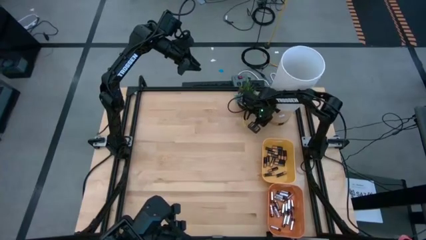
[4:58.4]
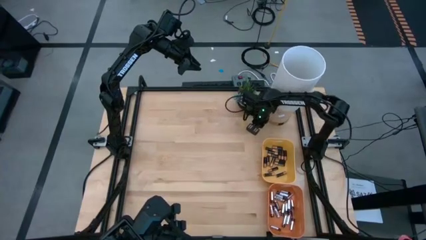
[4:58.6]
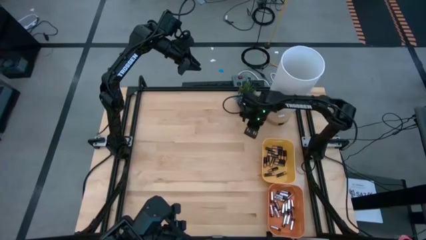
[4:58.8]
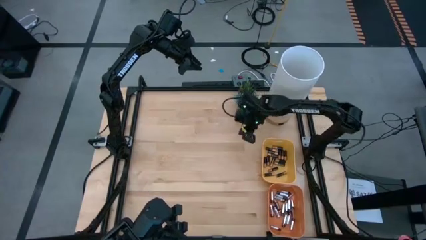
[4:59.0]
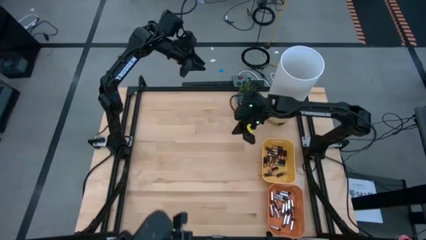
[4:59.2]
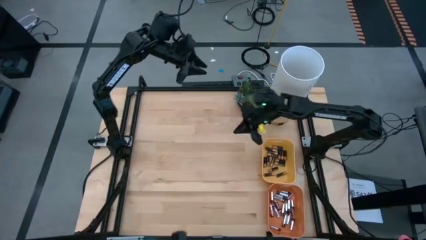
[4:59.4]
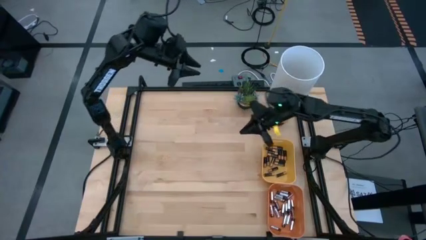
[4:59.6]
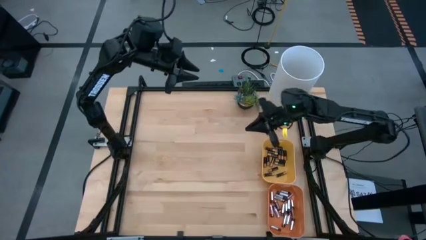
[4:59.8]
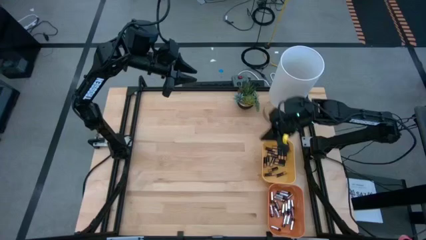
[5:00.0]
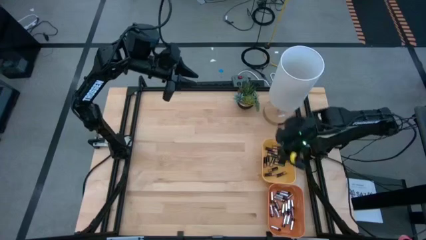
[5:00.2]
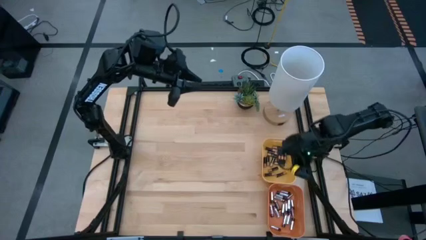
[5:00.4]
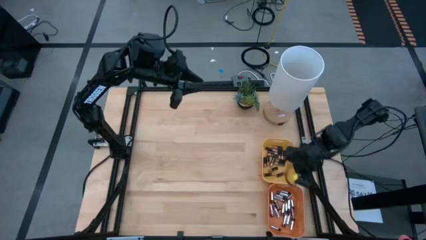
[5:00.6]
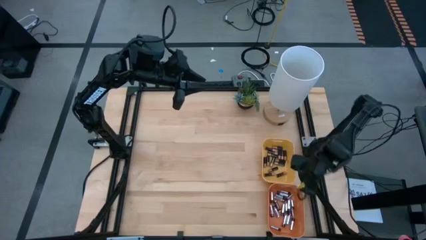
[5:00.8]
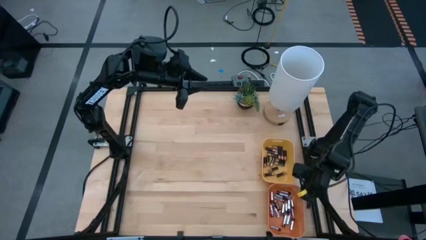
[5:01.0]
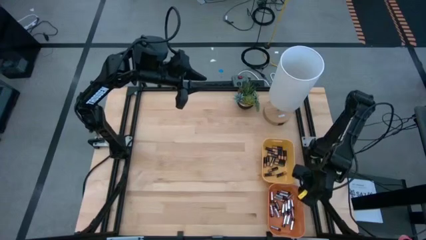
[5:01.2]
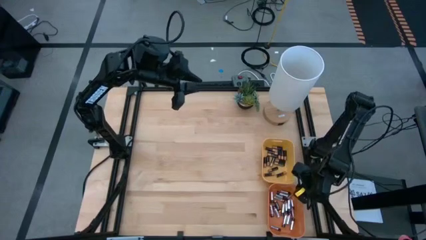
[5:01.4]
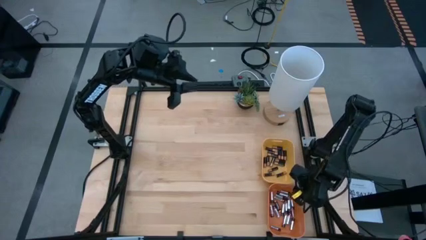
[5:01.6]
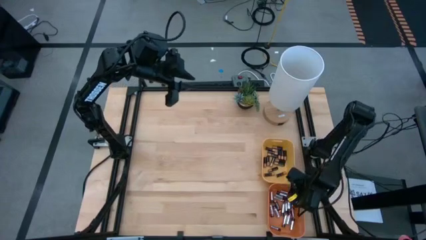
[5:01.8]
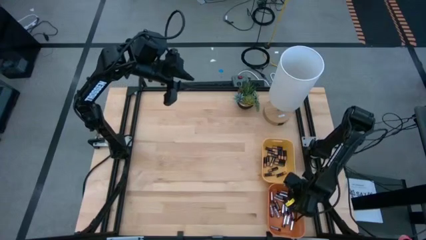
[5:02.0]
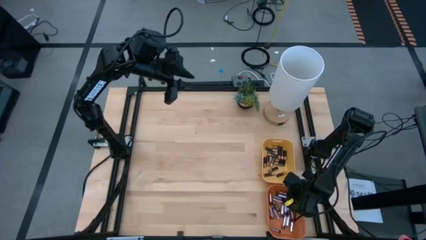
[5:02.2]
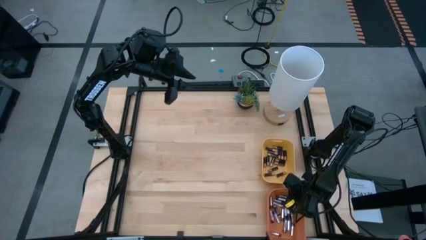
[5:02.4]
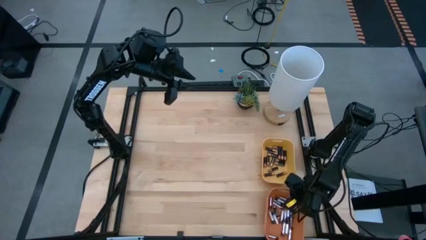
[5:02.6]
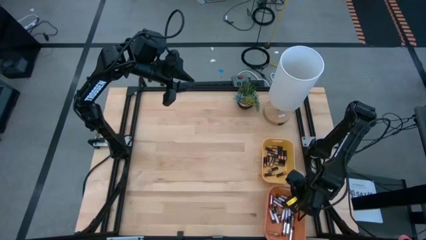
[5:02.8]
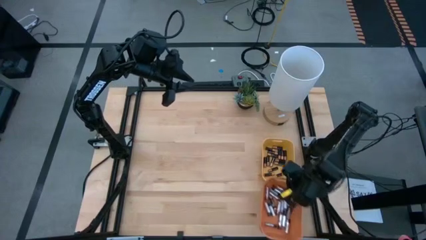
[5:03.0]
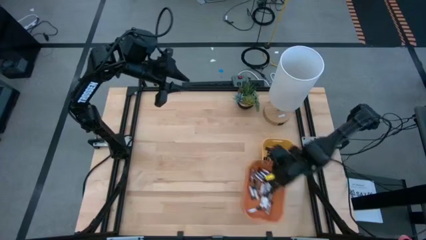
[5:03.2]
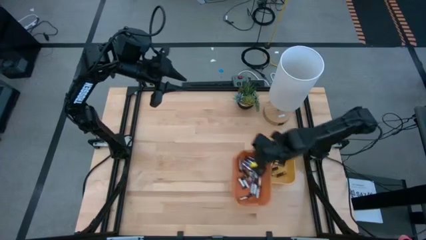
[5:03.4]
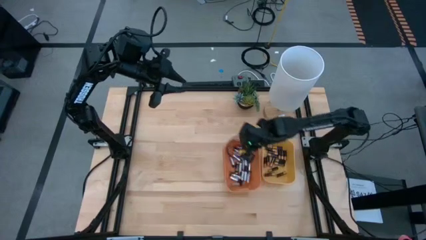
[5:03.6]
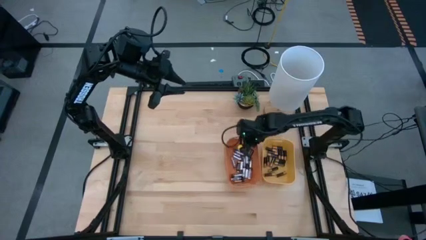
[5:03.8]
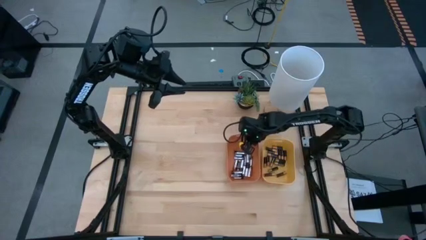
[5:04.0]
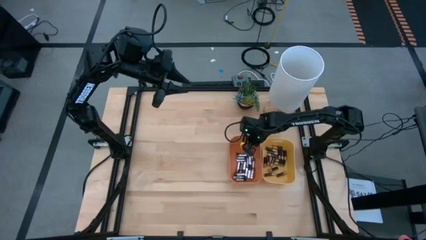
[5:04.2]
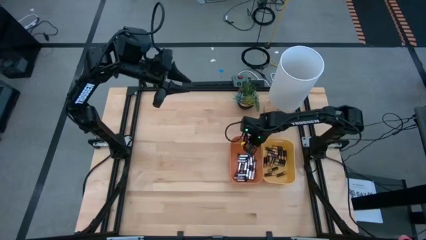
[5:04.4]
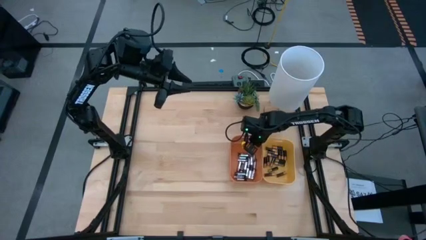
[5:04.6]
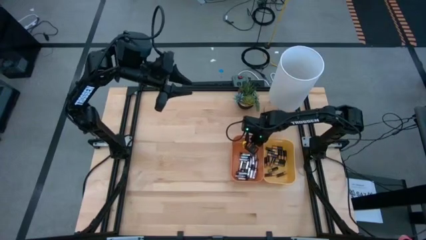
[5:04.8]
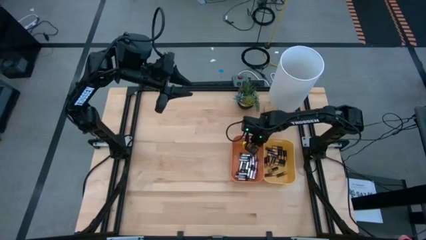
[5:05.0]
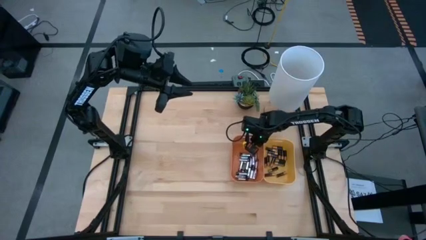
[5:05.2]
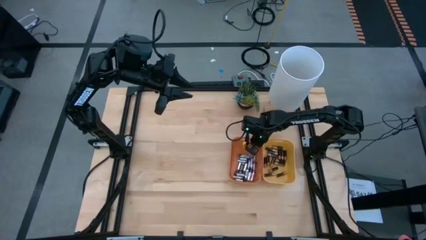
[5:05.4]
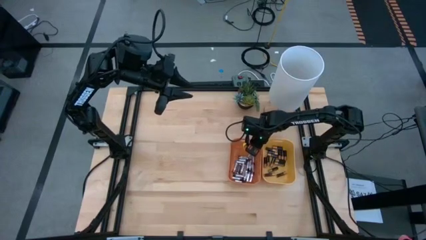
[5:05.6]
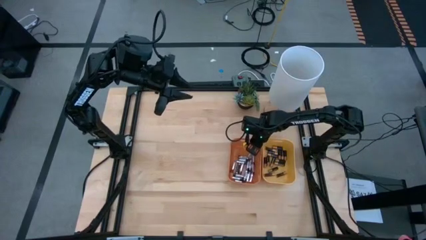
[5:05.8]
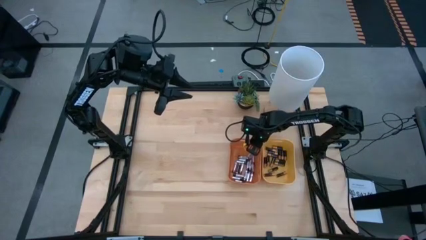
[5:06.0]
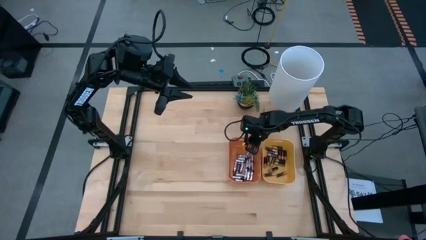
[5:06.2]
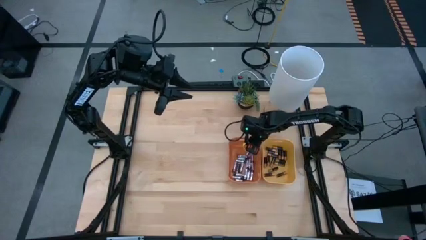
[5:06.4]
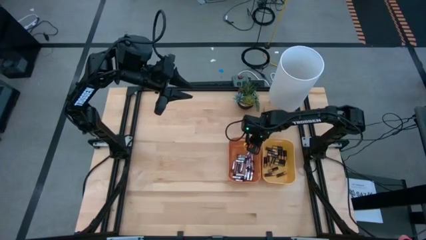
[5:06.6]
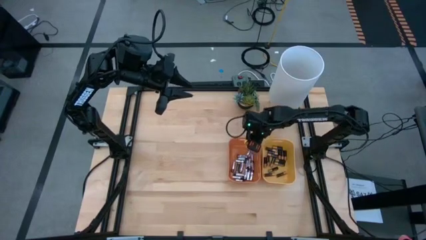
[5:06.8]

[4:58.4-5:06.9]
Task: Sort batteries
Move the orange bin to the left of the yellow bin

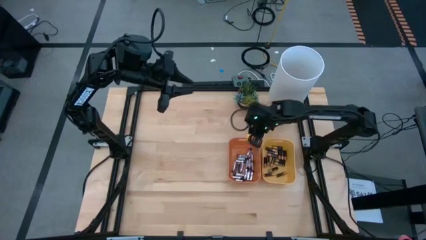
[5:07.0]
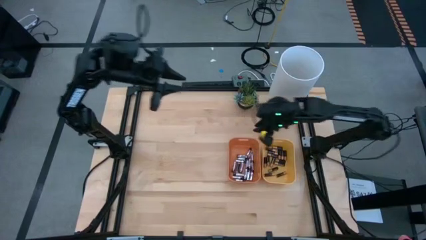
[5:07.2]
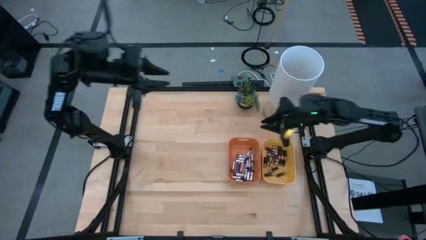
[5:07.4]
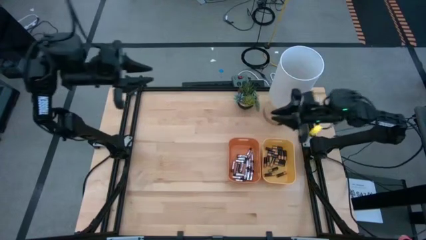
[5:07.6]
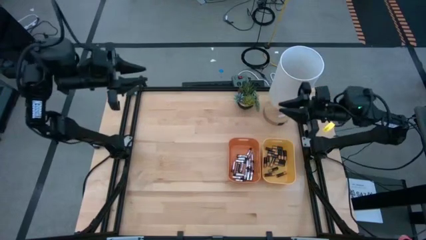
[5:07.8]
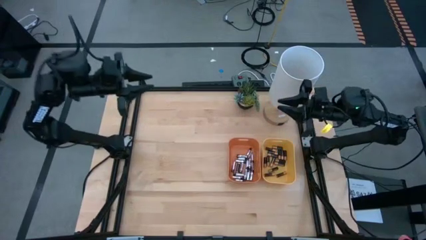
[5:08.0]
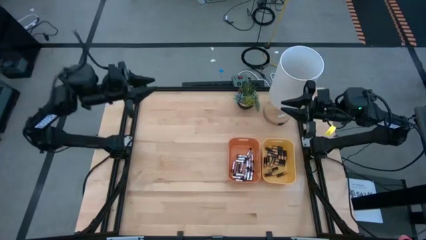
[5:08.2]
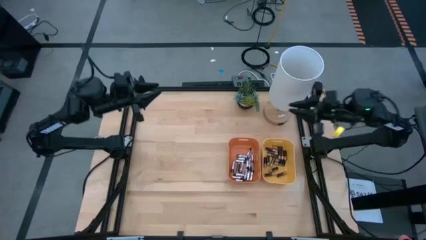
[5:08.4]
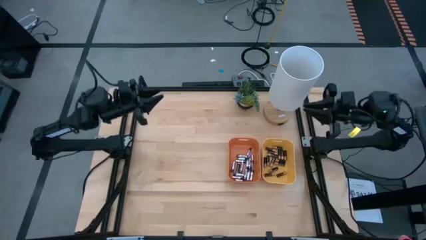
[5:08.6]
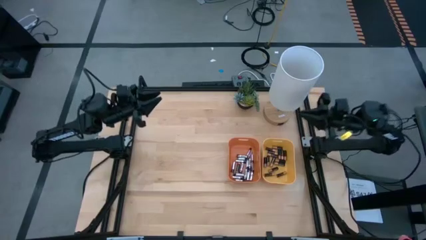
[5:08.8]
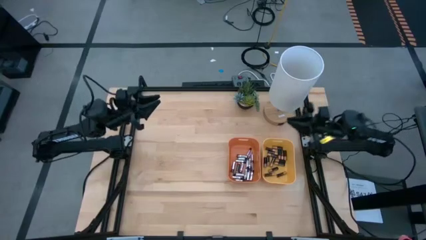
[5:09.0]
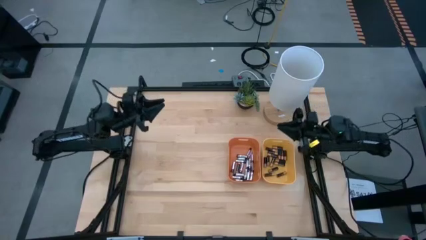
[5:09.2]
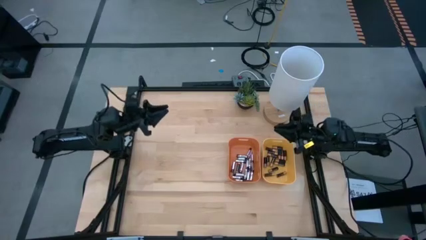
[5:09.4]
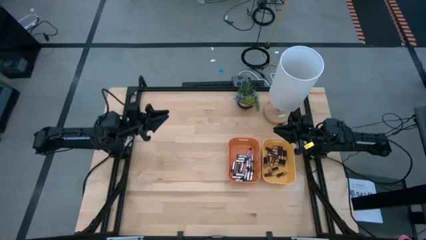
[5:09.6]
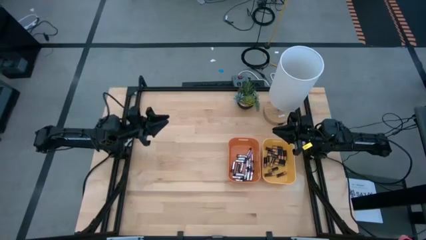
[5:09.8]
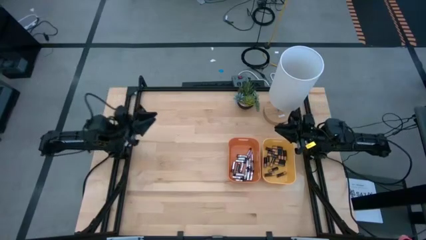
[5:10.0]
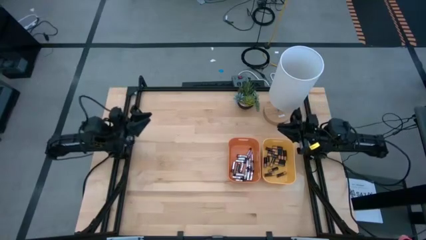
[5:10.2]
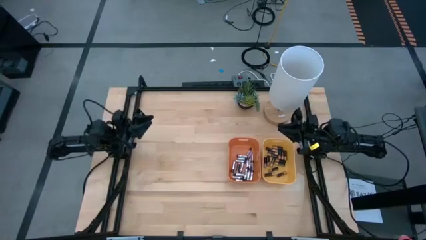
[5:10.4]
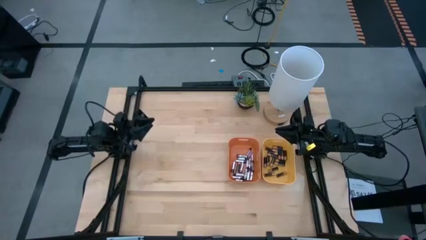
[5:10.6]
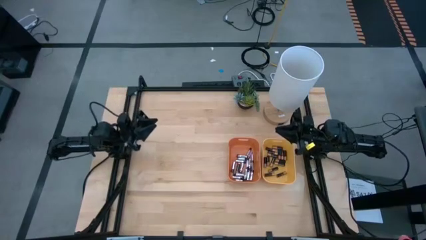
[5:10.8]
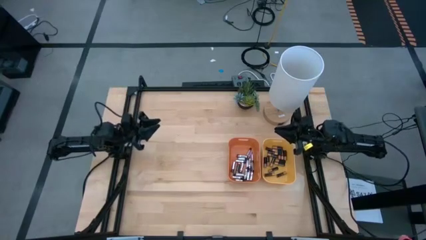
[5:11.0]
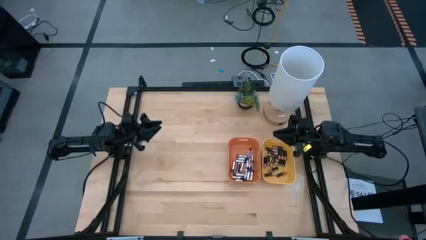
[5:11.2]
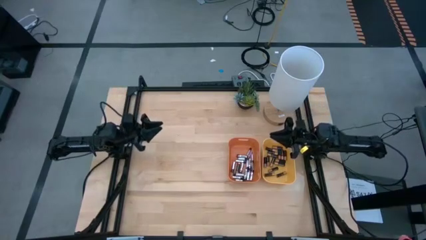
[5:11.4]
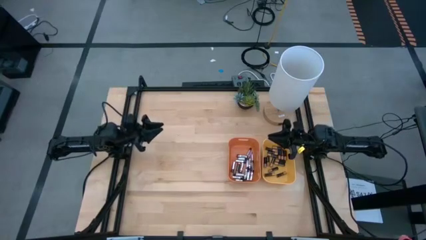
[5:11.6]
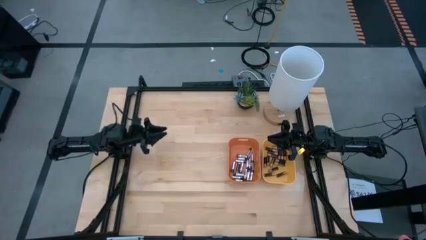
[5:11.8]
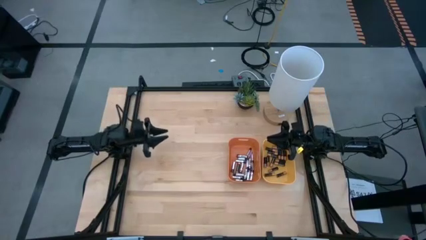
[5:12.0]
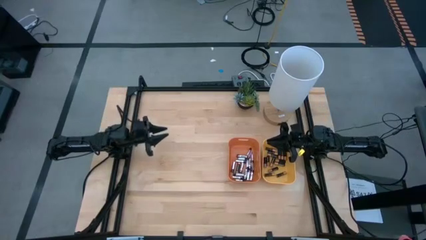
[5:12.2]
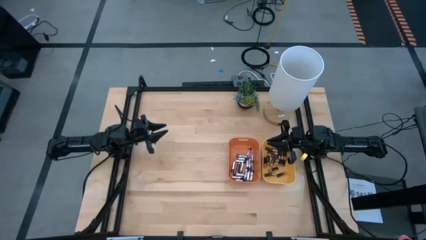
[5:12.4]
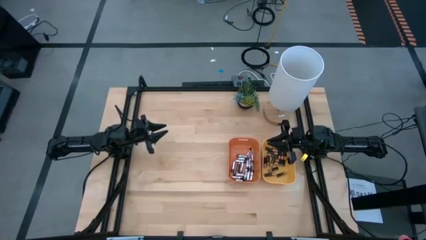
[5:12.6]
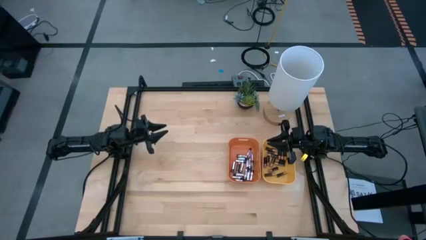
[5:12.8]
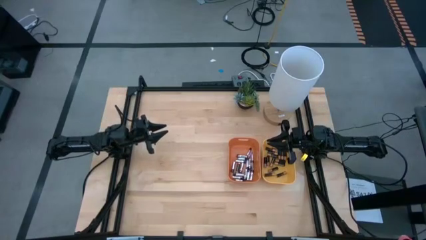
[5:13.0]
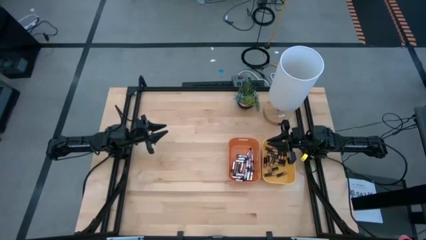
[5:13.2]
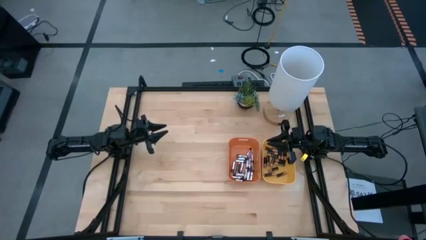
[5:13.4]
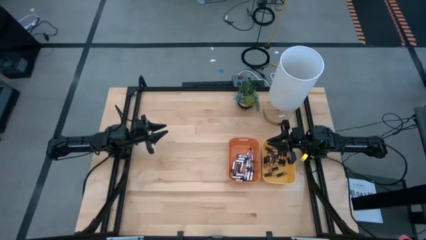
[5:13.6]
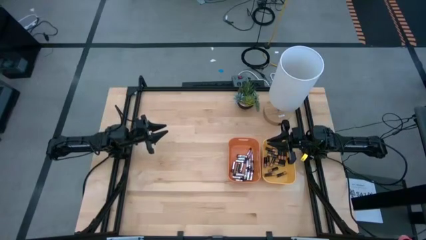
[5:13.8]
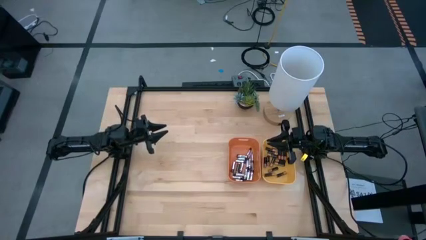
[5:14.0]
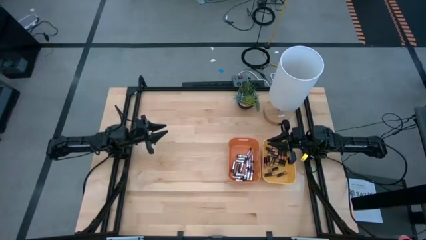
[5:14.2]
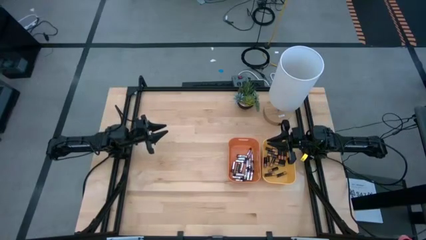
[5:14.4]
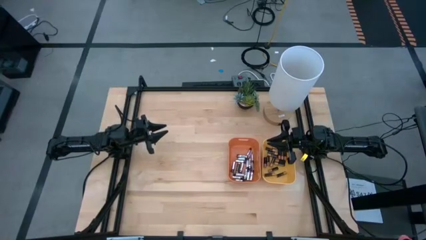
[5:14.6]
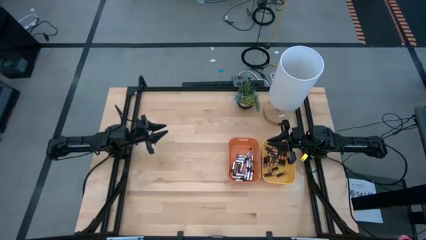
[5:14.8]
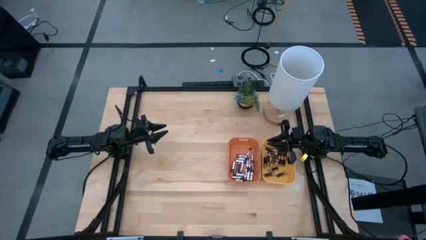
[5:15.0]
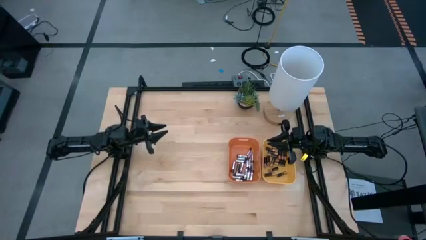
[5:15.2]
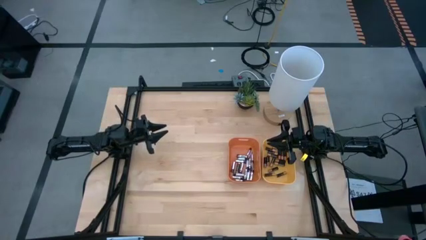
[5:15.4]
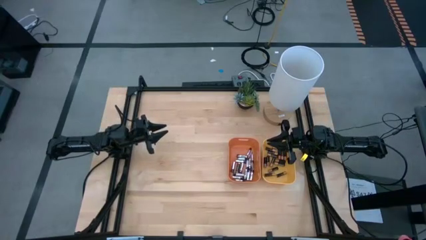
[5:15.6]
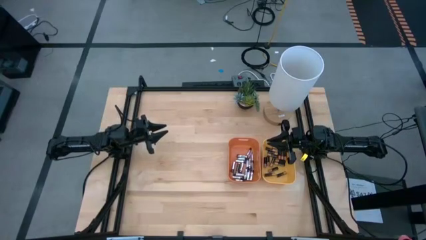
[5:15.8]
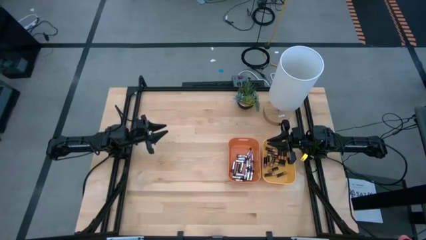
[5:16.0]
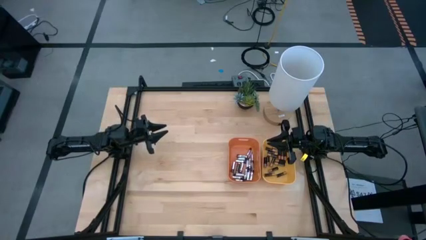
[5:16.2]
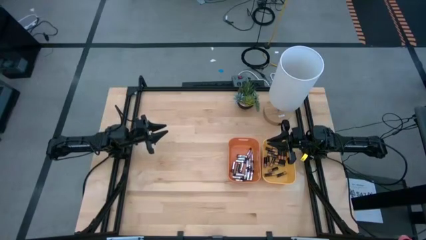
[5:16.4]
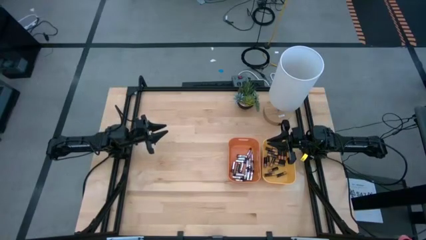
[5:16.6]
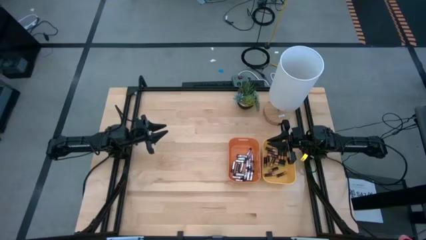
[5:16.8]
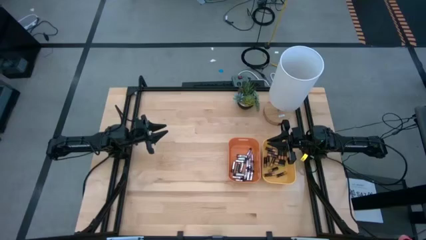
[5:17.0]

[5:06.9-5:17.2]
Return to Home Position
